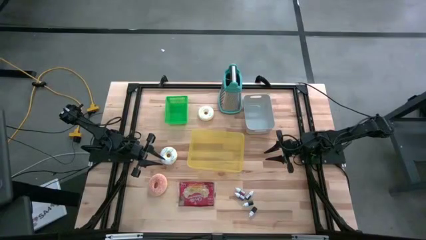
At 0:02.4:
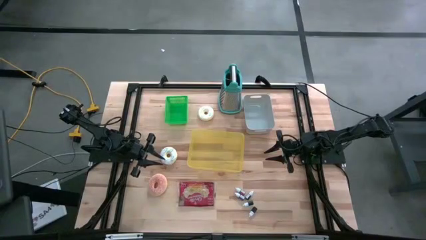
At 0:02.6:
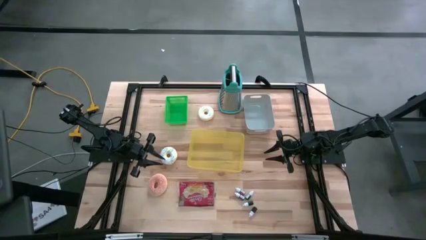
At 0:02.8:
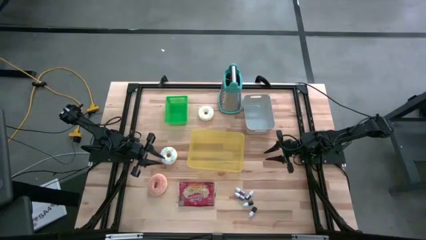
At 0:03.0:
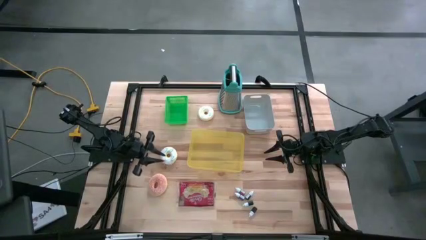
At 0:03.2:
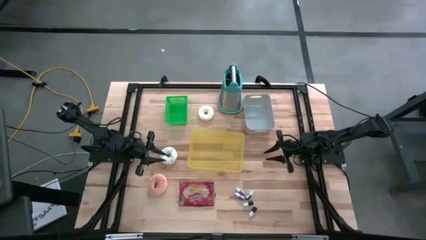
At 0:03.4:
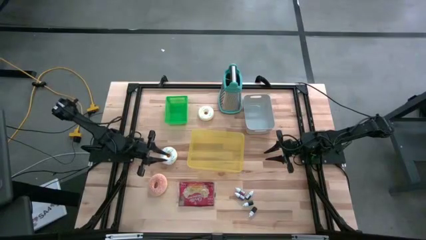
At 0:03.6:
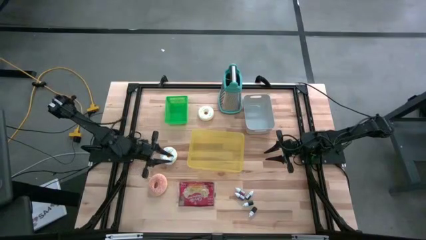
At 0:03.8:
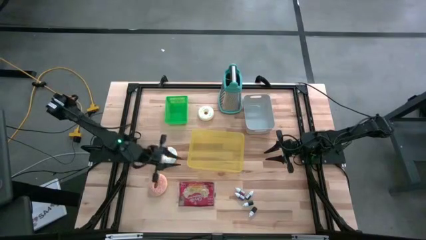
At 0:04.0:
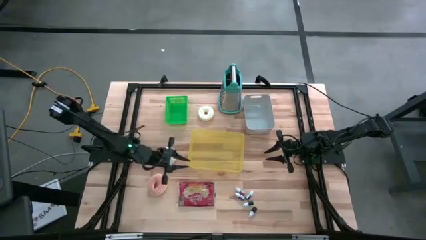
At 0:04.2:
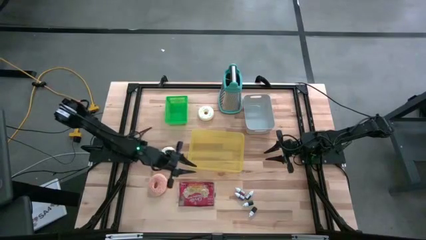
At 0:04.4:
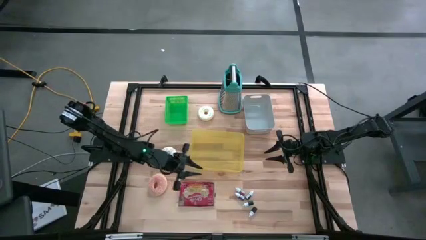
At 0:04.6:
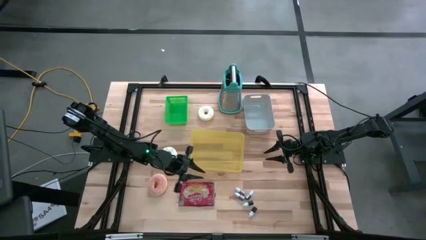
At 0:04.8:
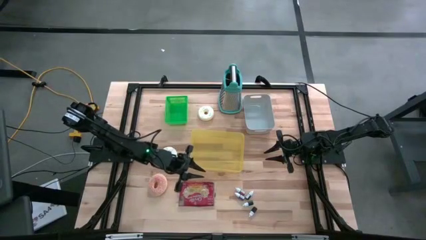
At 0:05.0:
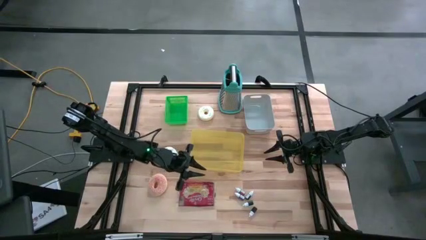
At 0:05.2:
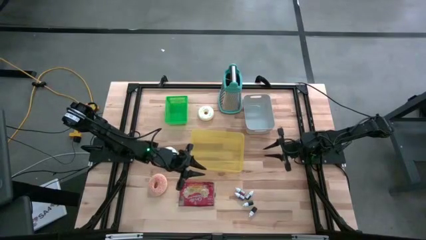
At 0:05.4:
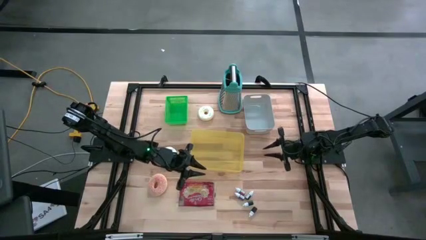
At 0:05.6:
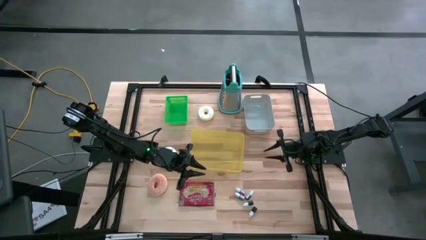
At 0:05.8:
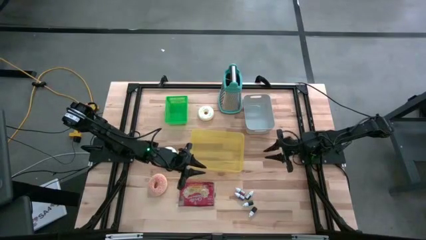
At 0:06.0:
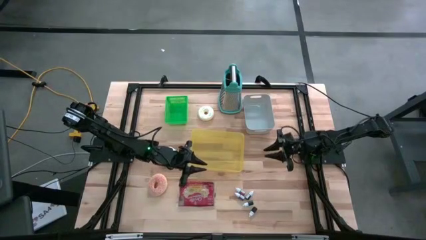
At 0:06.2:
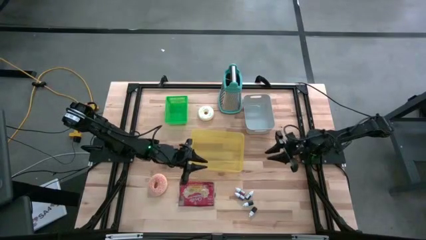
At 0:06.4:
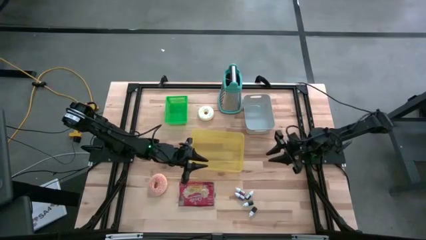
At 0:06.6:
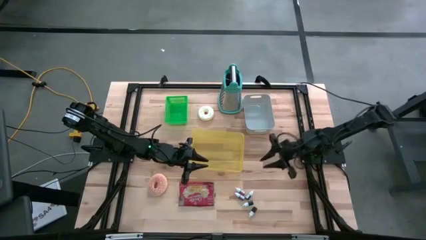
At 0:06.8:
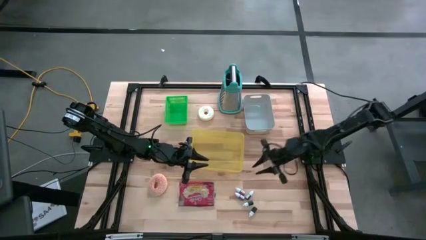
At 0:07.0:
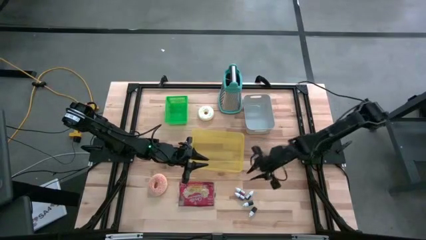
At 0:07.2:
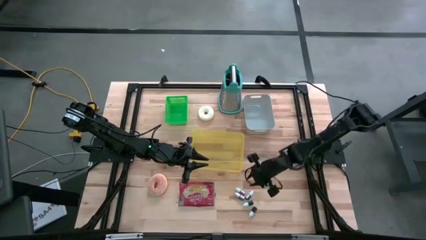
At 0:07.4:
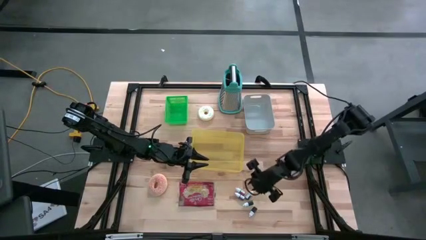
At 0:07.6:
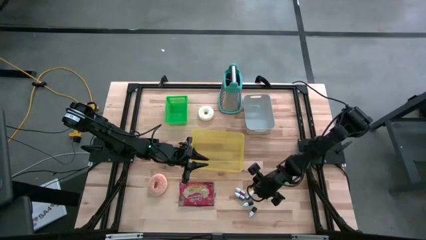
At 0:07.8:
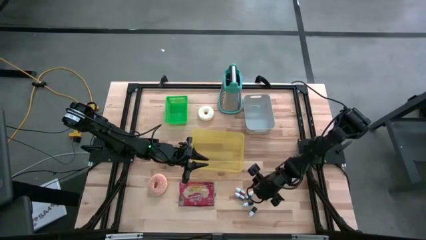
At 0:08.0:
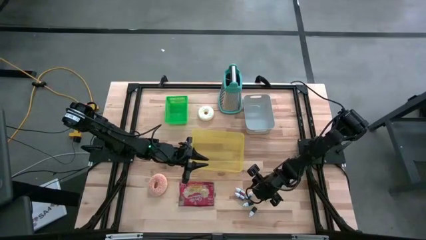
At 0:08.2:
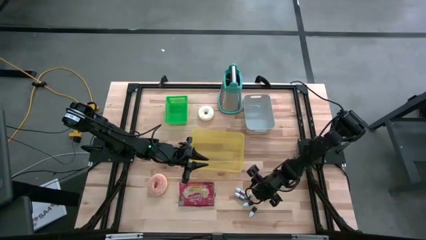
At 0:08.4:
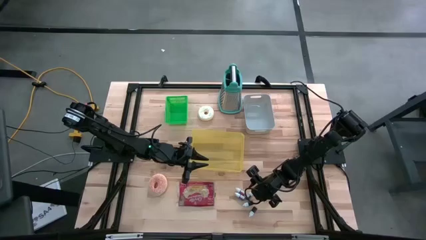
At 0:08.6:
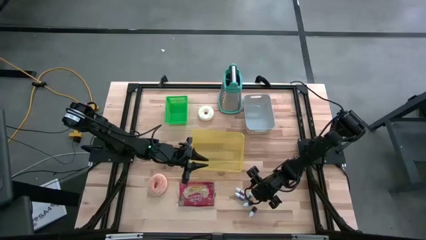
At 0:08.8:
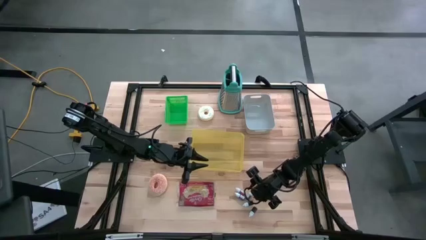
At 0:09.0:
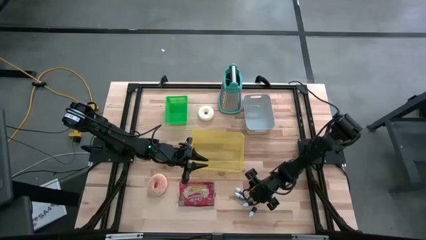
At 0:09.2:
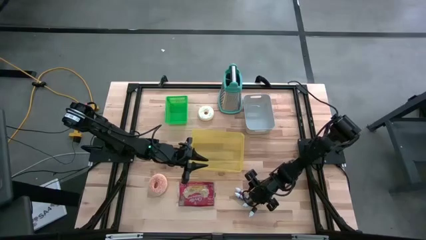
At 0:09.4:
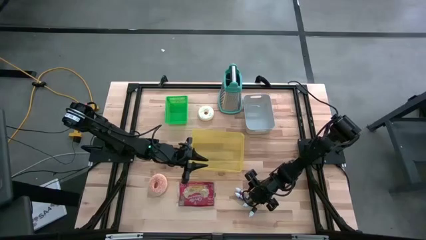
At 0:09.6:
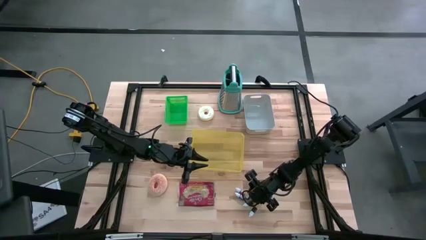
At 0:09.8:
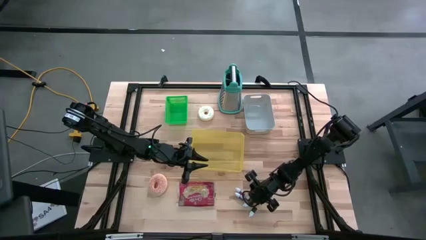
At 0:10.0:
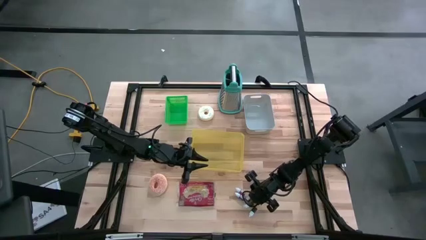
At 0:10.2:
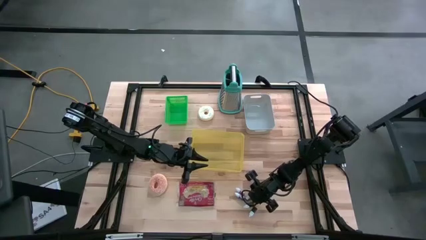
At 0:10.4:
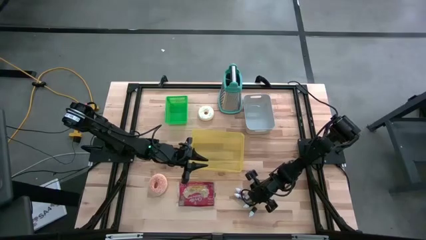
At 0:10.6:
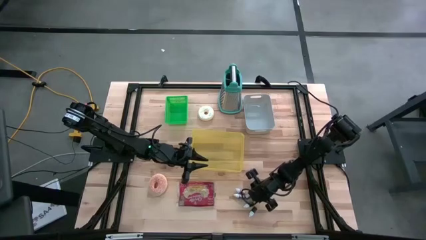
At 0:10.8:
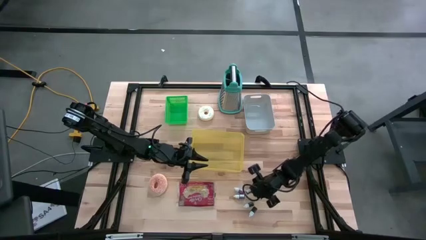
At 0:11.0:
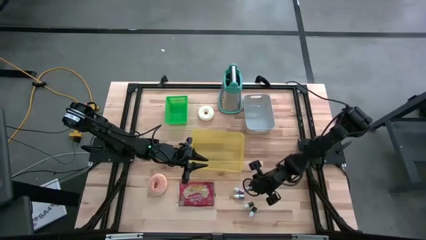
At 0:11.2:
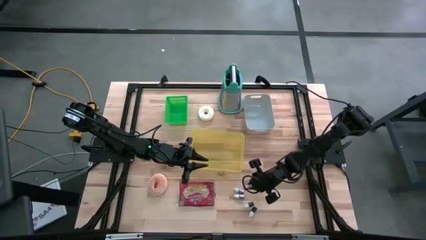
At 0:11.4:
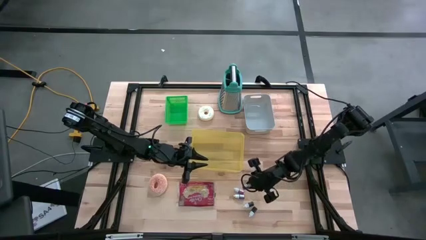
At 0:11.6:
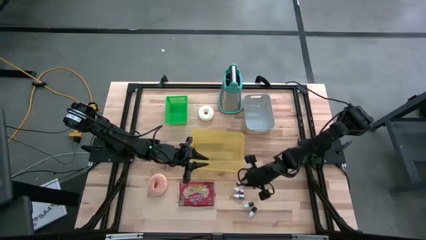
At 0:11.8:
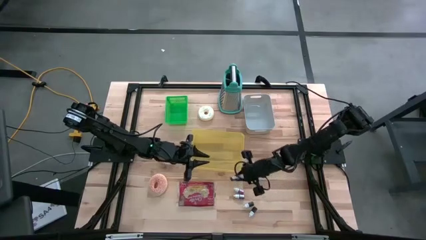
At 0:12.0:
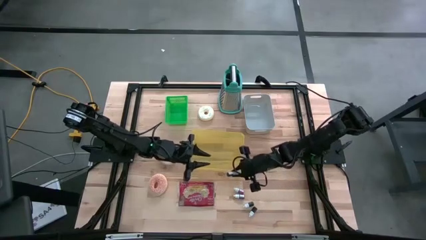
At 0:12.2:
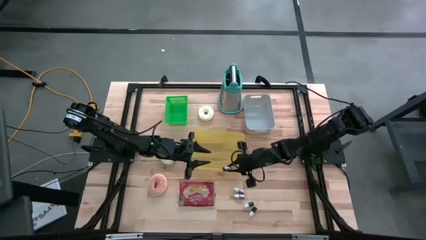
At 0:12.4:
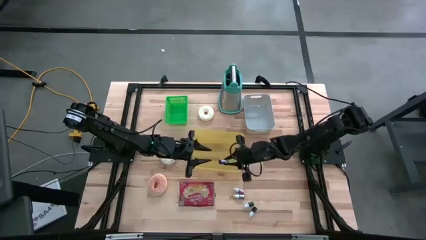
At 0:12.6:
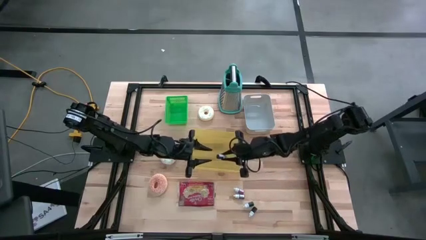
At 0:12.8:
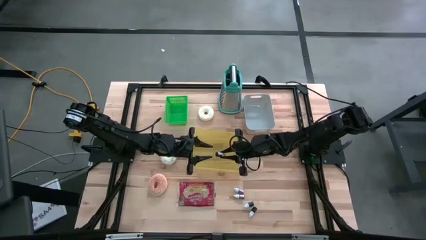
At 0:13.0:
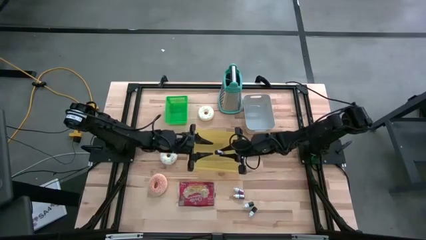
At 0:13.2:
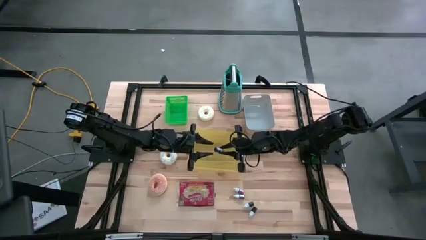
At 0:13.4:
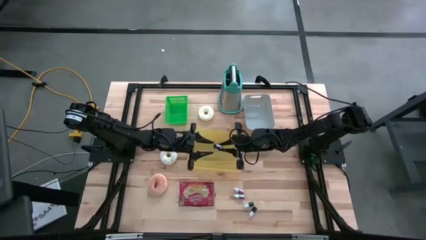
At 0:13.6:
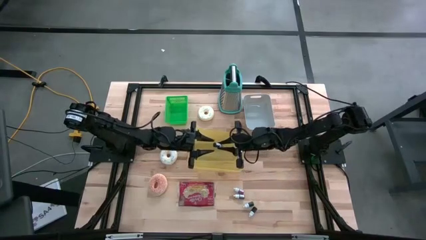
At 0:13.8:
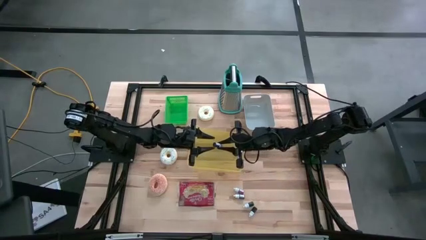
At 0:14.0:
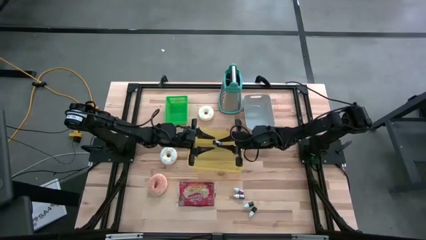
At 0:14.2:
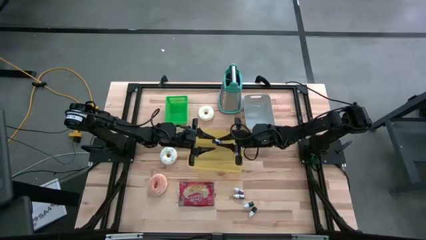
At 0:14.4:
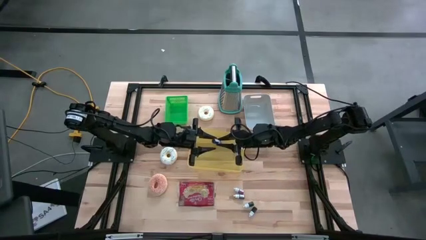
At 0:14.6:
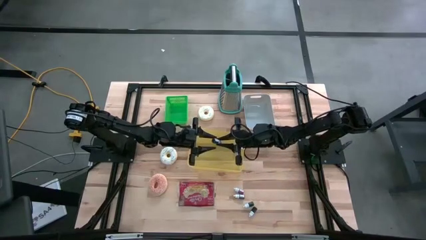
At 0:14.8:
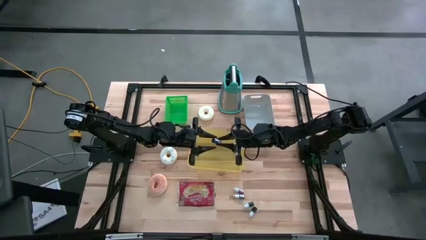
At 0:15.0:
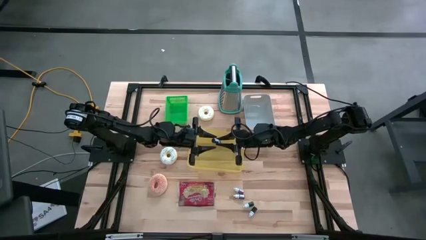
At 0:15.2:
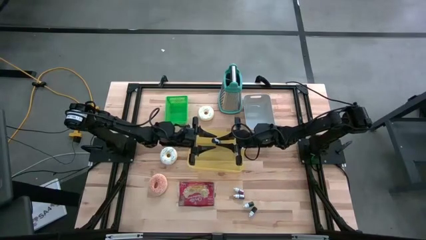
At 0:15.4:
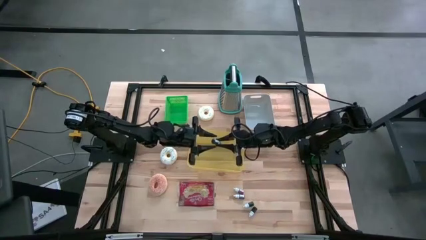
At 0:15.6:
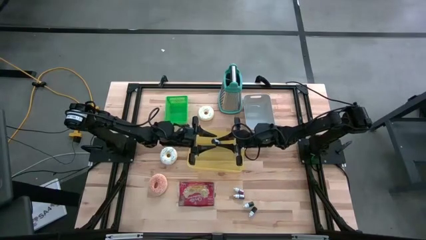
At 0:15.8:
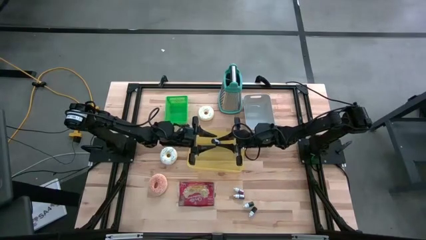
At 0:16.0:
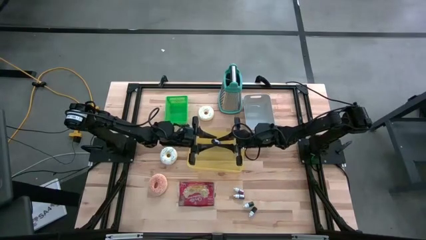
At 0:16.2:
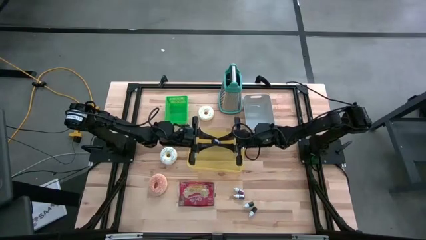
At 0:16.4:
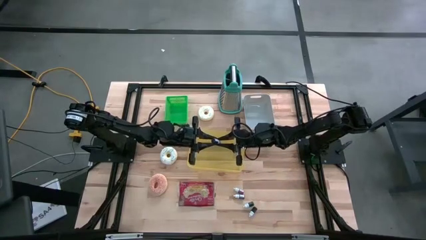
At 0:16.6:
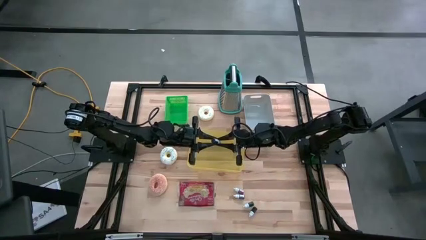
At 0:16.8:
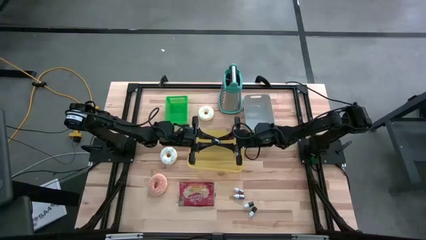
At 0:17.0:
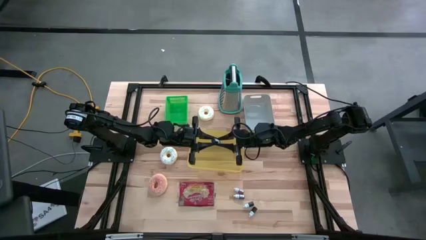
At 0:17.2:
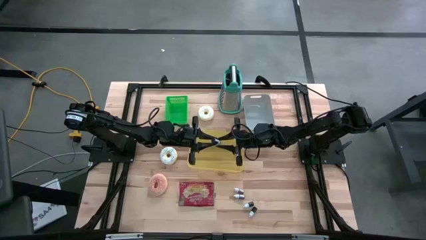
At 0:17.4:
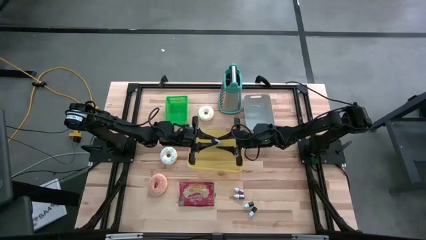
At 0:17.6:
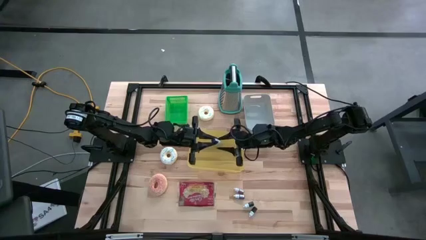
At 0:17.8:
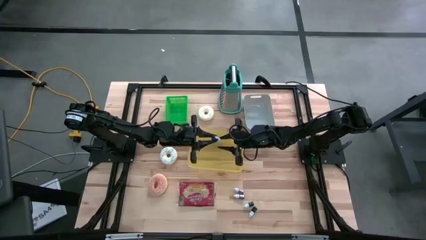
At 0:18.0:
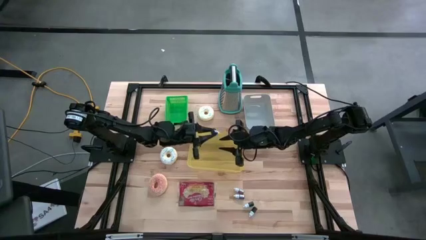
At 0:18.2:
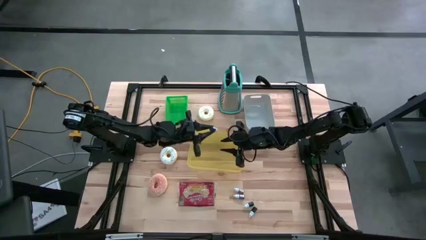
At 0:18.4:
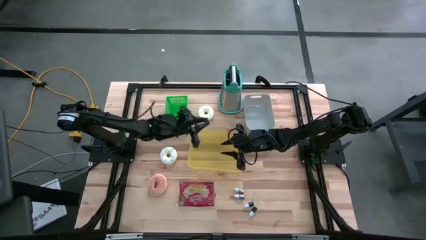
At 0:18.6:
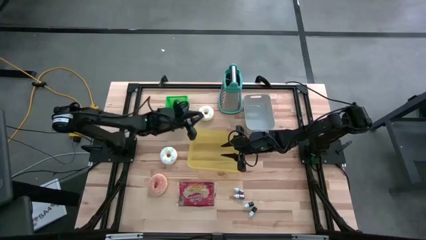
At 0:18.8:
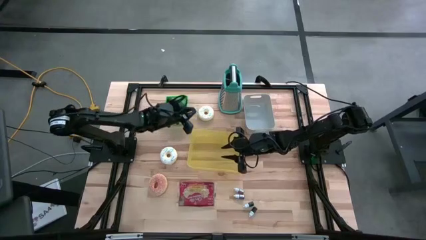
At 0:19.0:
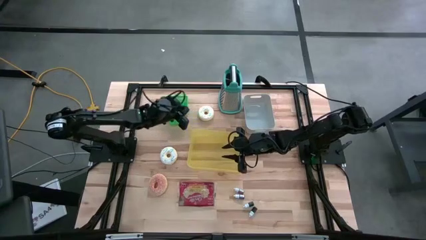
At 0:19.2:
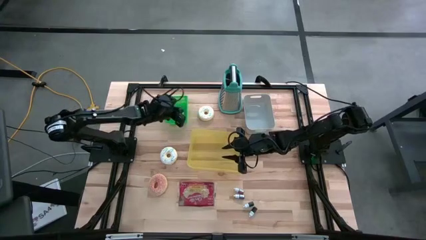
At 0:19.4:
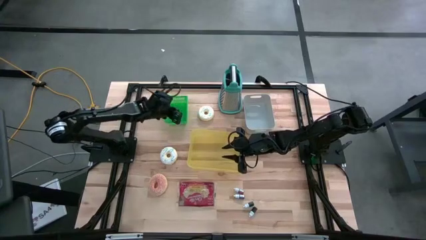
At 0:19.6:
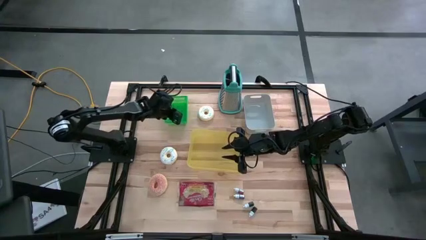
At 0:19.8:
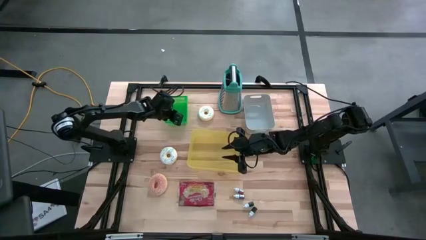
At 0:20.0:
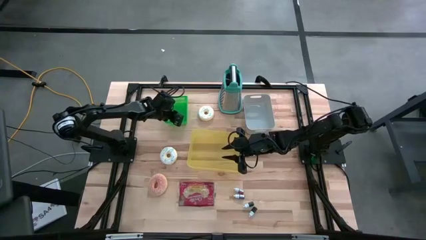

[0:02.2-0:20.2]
Put the blue food coloring bottle into the green bin
